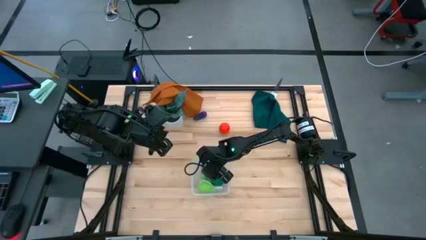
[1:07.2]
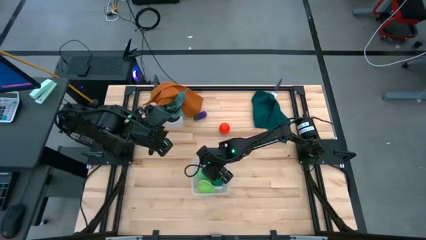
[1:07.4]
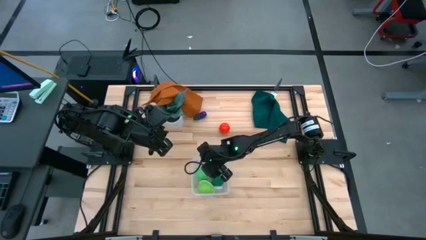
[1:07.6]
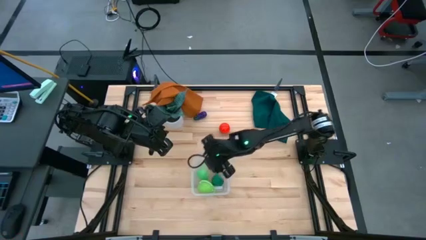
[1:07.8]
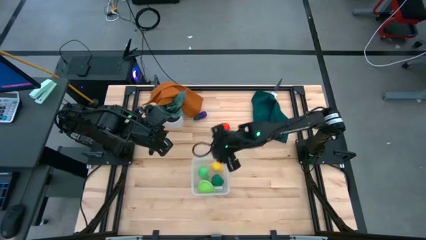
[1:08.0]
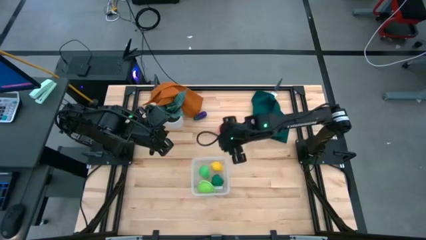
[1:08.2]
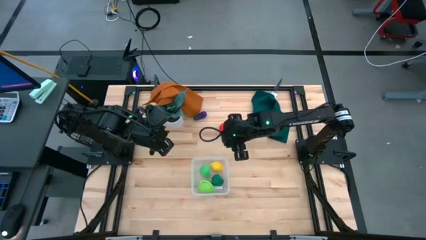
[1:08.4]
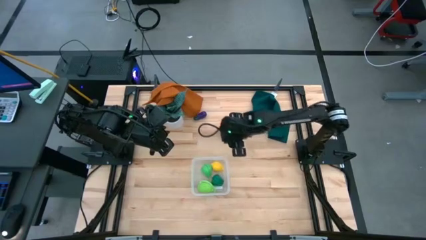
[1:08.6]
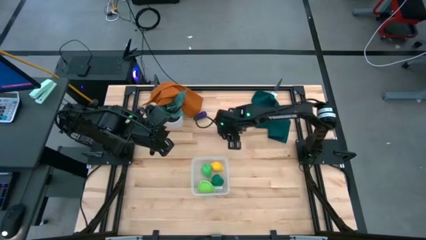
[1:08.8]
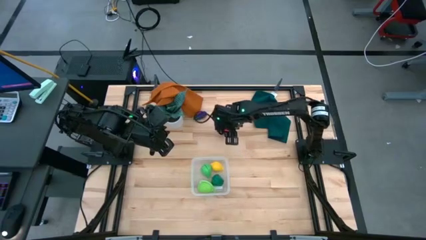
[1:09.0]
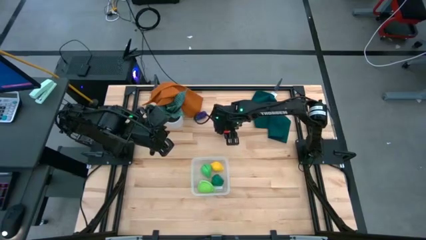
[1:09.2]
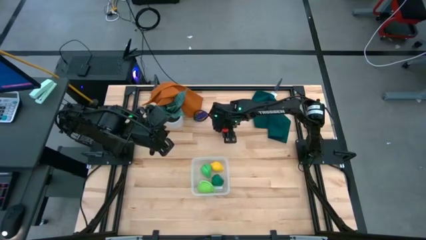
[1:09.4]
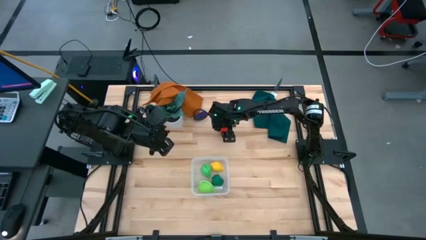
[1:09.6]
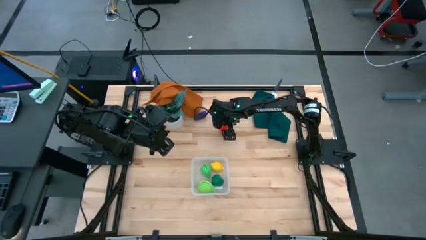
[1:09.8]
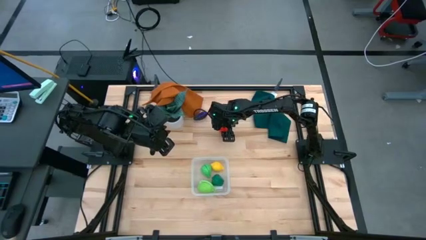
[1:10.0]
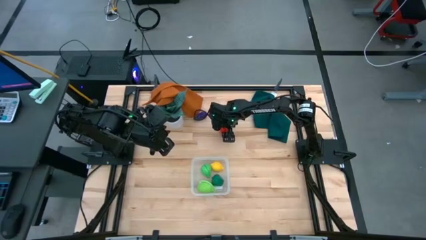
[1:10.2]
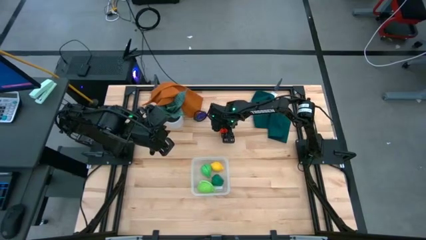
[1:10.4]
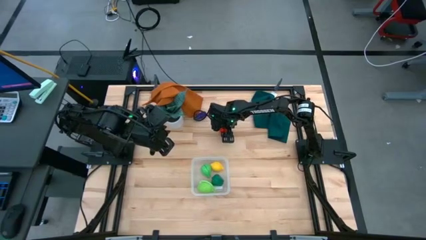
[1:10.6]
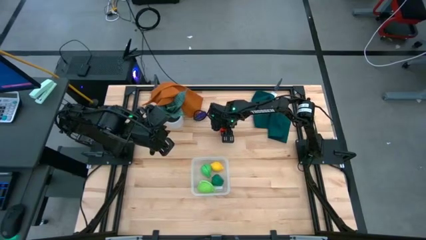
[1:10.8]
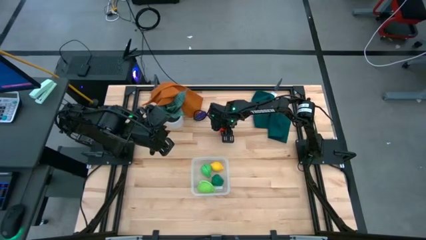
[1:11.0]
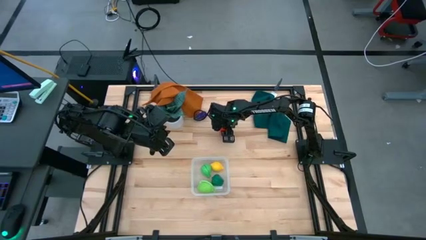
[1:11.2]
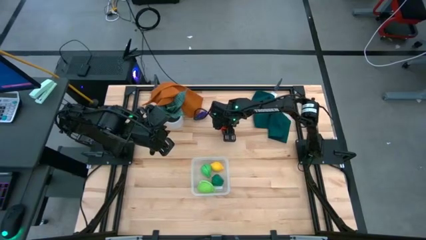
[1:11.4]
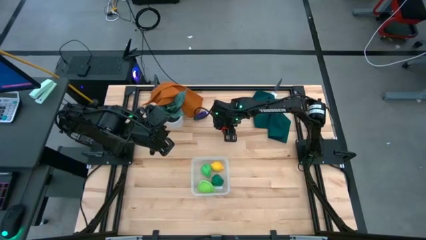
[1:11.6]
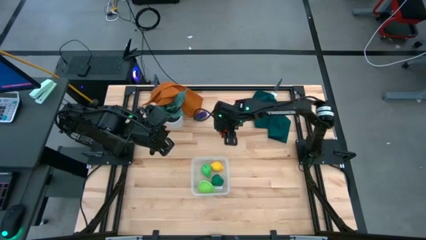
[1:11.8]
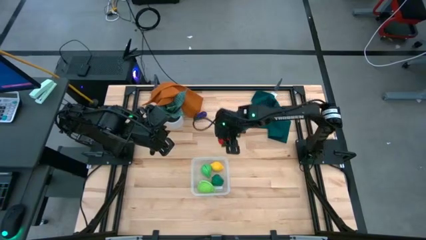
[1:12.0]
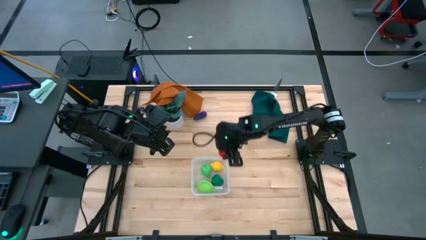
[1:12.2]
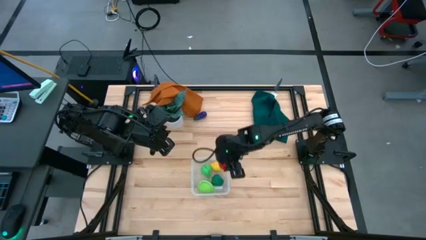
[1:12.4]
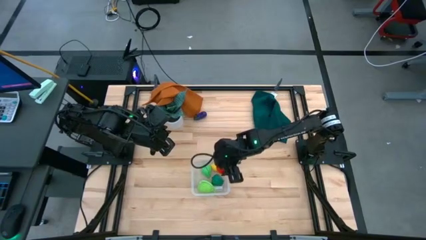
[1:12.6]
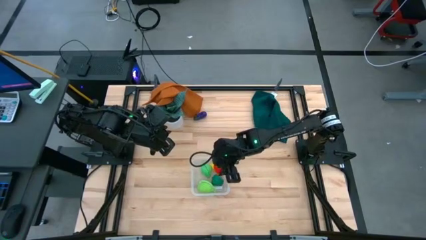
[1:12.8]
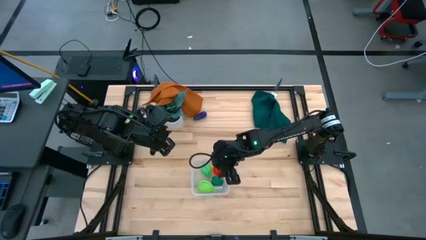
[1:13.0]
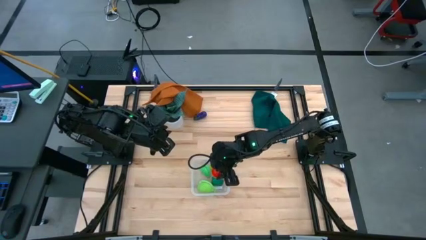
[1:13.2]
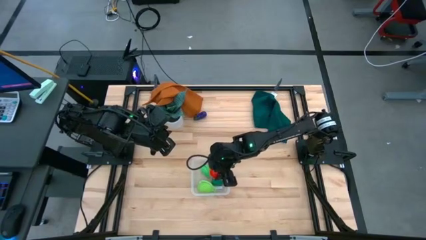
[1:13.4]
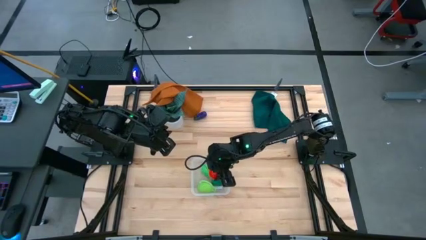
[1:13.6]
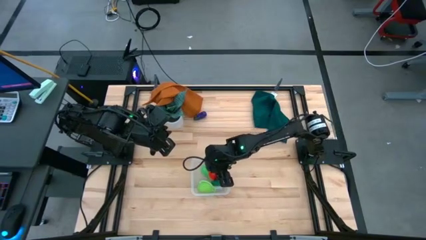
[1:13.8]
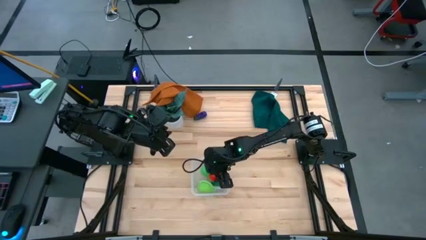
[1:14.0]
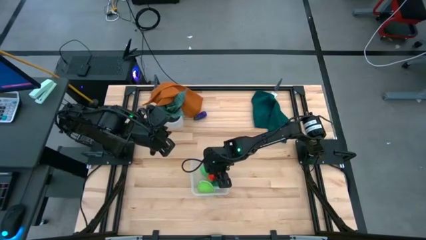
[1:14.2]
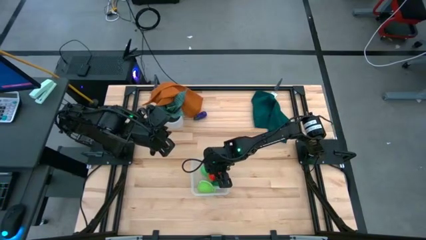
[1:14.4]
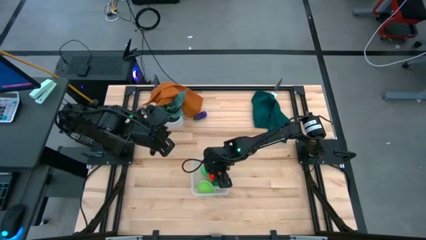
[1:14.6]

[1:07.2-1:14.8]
Task: Pick and placing Produce into tupperware
Put the tomatoes into the transparent bin

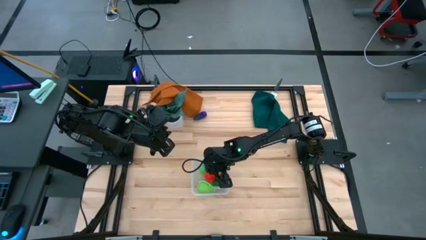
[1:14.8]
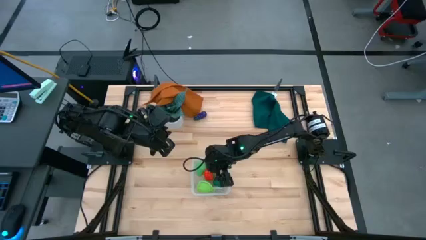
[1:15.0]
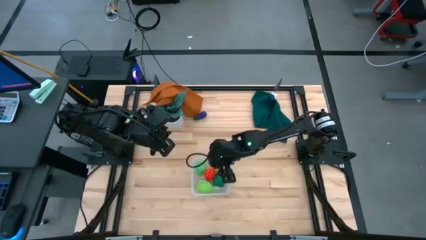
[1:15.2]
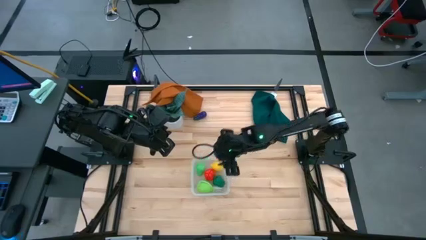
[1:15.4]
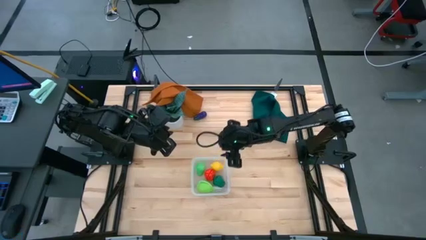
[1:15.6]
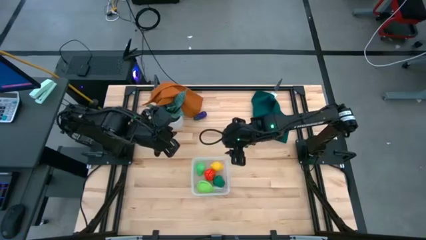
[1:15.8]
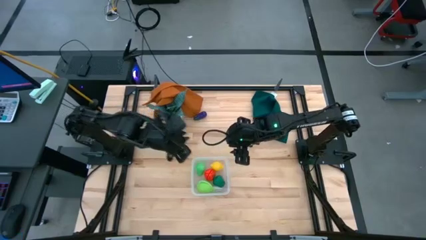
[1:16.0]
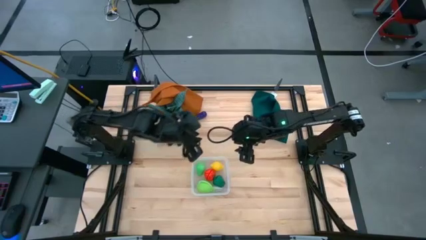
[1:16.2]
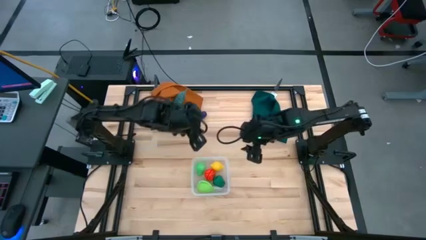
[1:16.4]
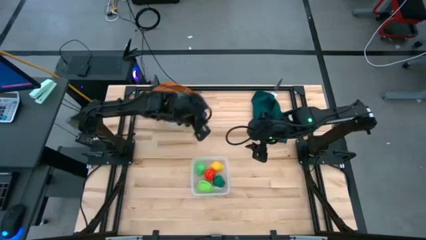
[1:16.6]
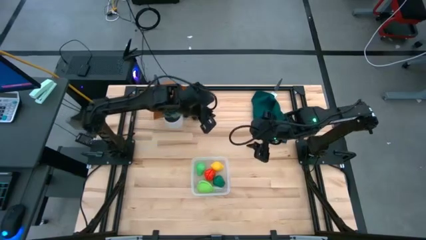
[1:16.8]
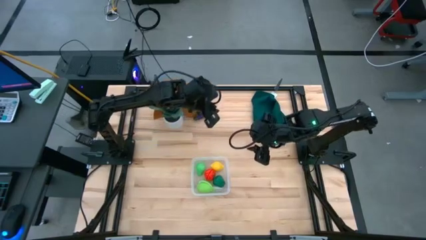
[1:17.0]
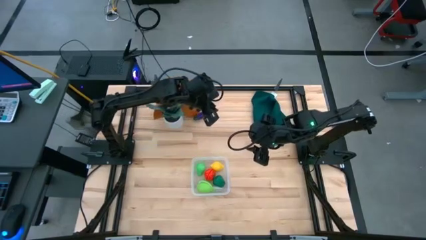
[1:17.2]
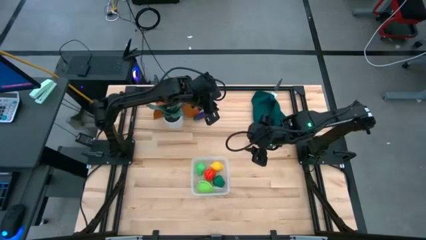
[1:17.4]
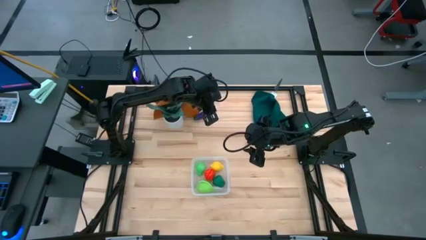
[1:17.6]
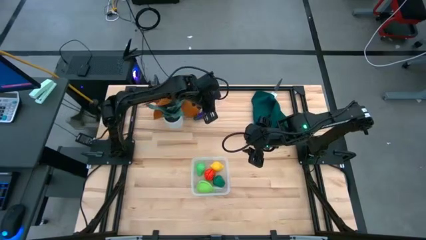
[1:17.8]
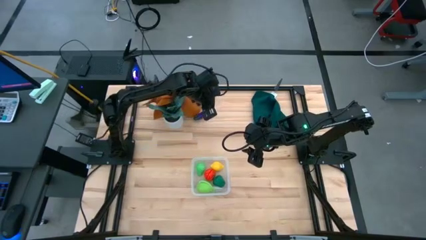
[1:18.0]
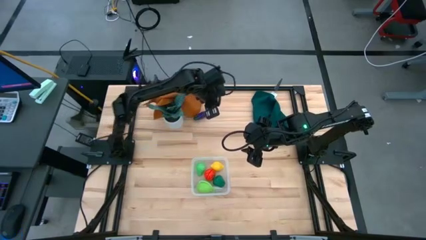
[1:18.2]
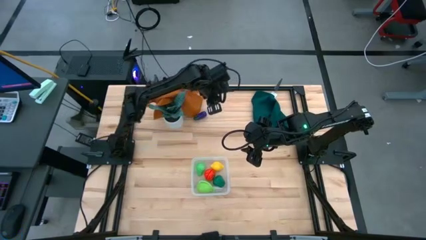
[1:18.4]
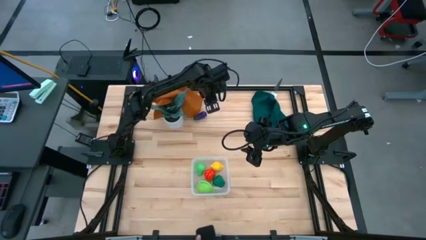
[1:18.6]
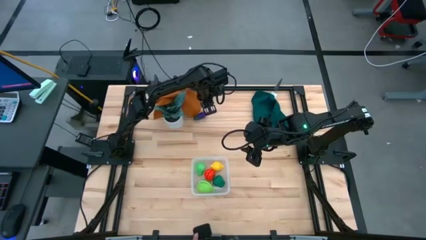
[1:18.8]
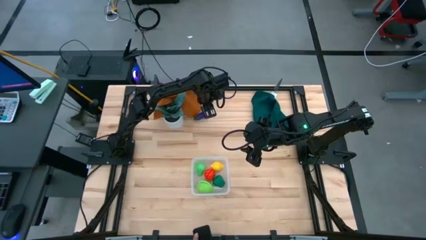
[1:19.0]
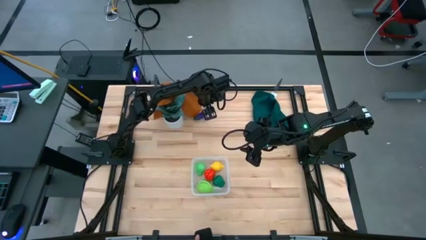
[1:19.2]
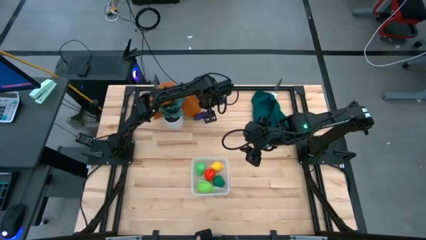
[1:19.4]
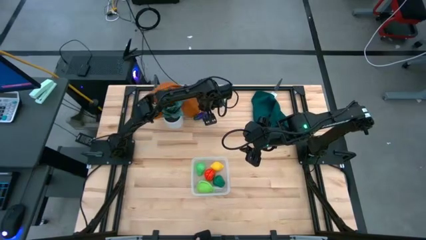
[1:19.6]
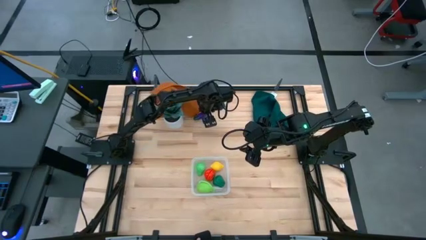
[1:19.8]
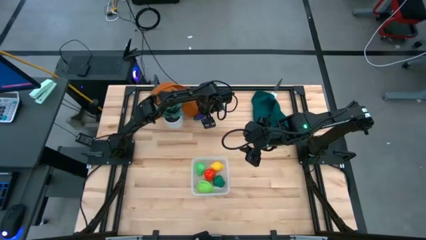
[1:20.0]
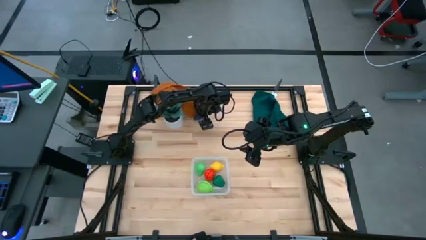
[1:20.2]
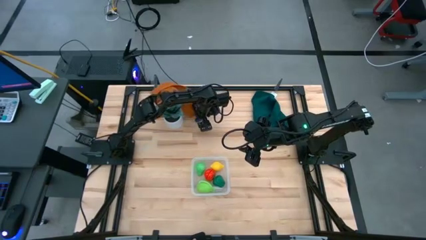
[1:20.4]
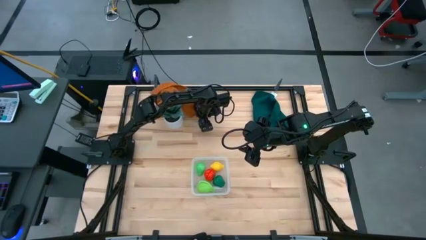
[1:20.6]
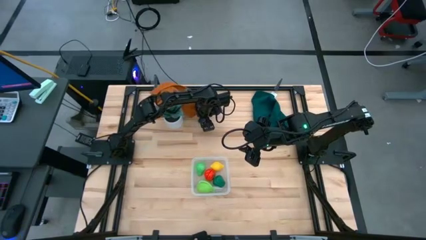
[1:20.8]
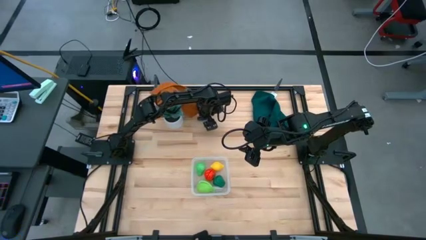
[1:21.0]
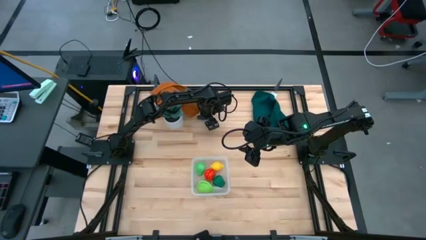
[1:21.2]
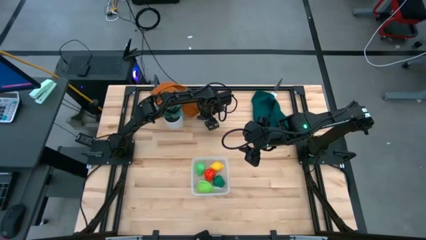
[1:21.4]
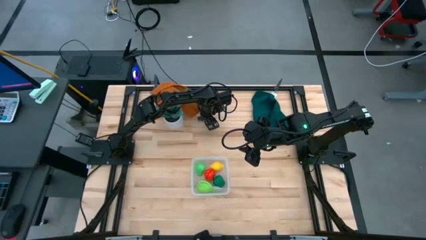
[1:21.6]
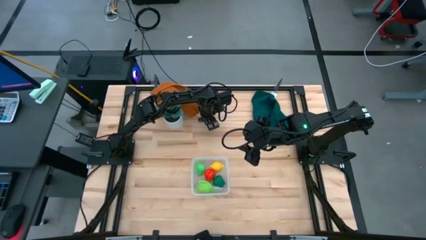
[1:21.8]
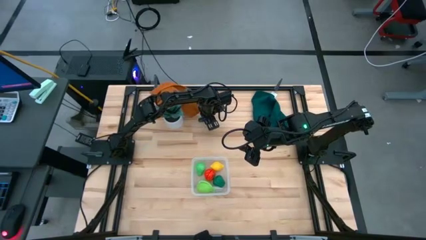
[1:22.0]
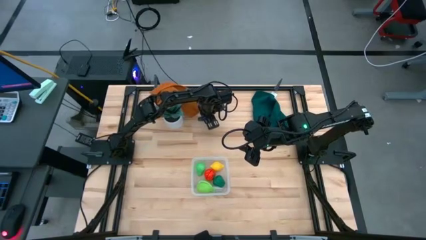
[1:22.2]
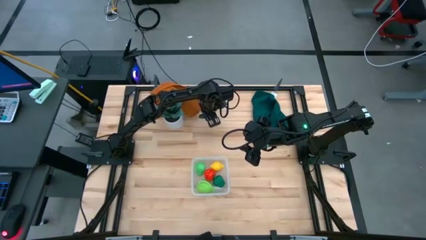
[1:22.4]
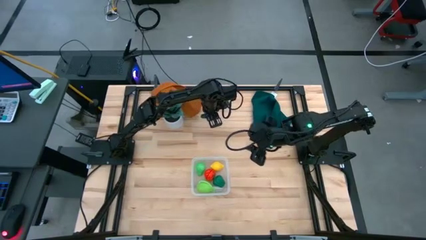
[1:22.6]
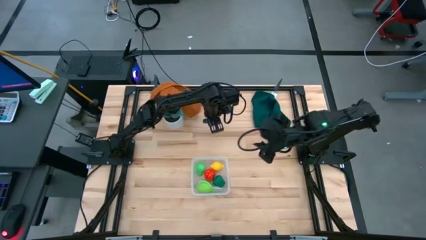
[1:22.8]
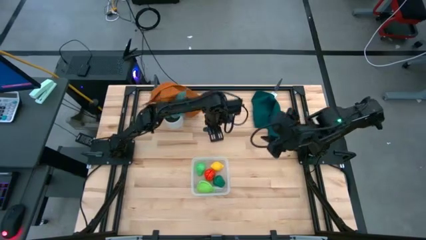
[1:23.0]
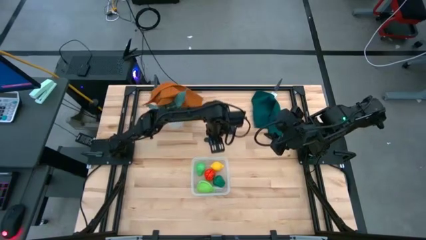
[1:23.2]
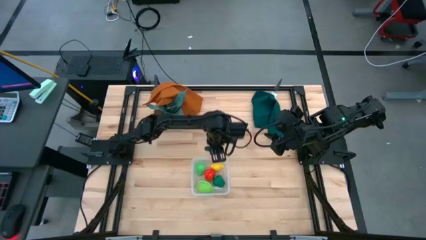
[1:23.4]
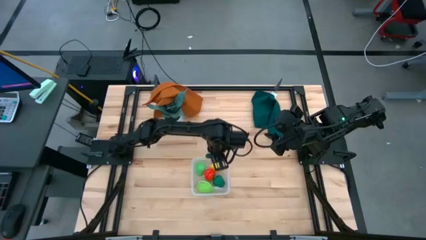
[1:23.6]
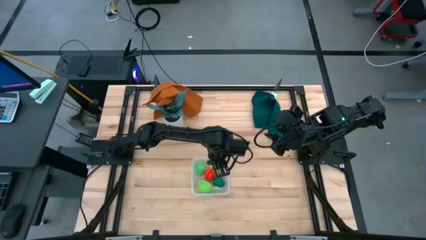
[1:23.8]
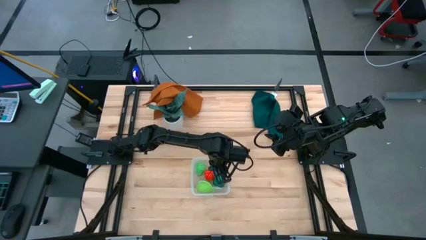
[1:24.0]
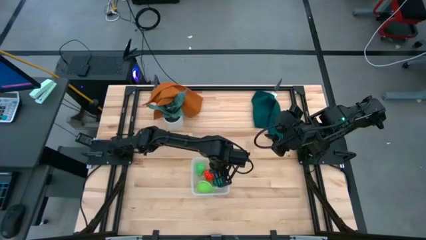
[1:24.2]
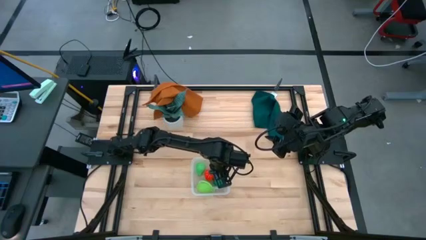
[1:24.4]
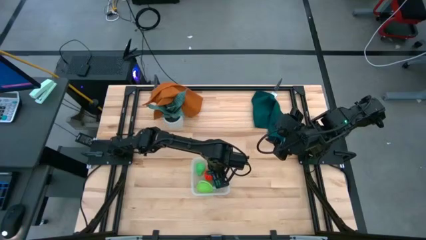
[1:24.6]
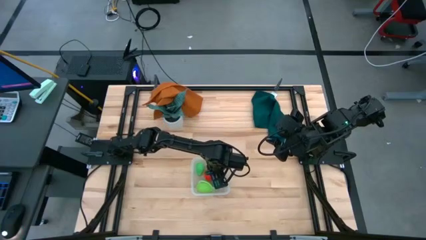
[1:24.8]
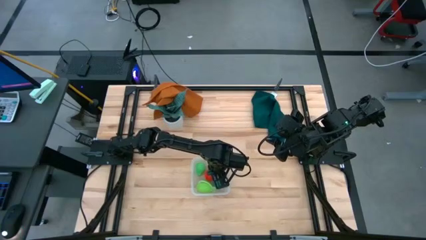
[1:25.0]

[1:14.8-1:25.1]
Put the eggplant into the transparent bin
